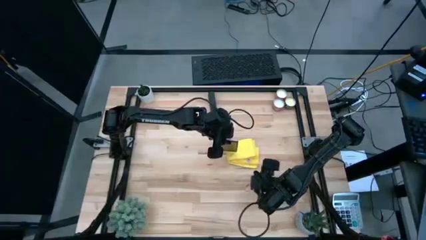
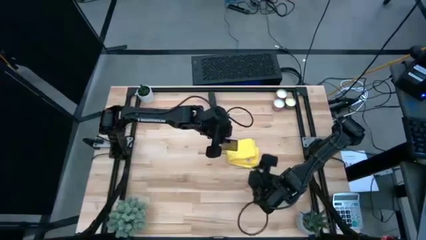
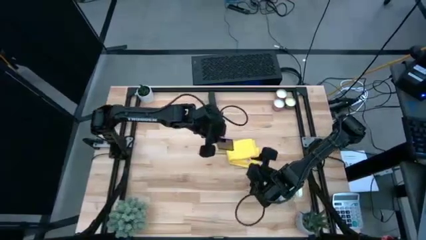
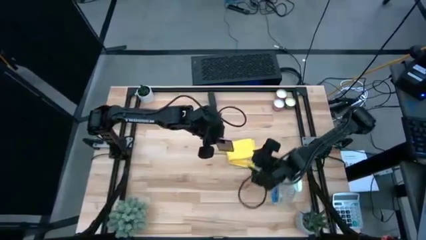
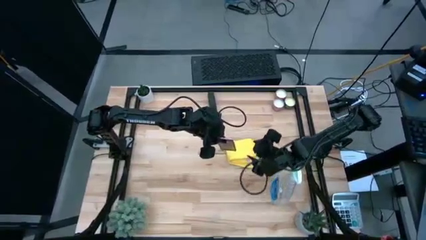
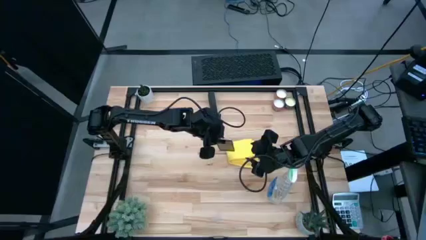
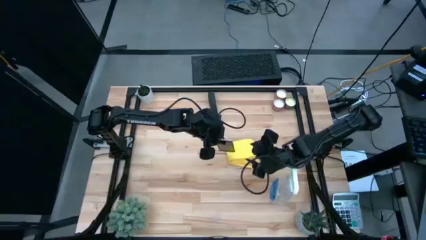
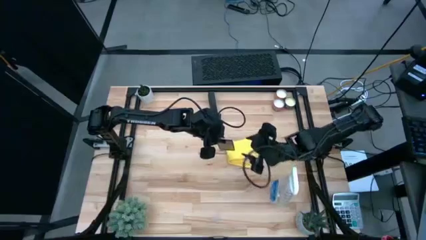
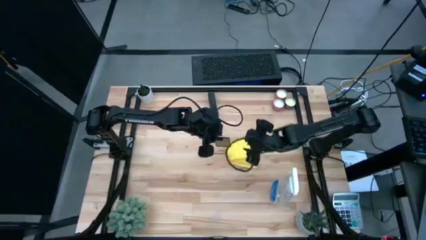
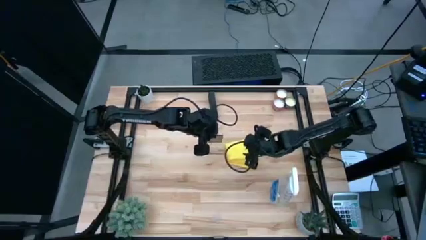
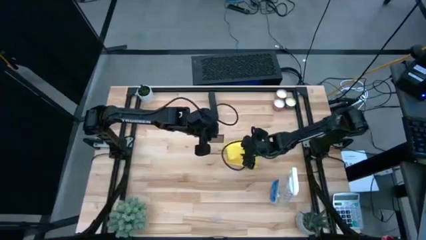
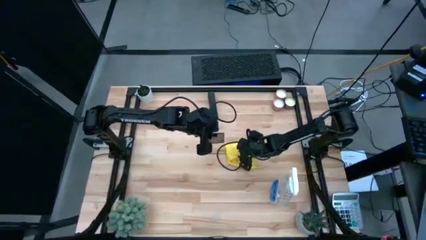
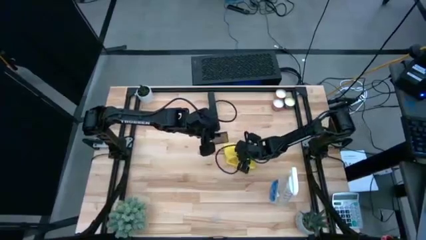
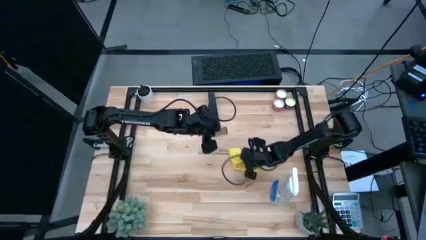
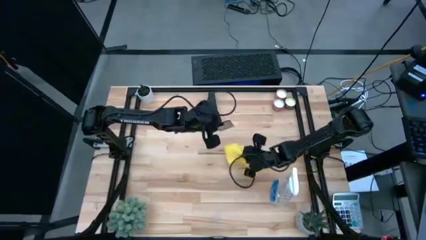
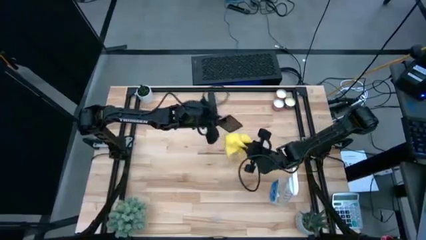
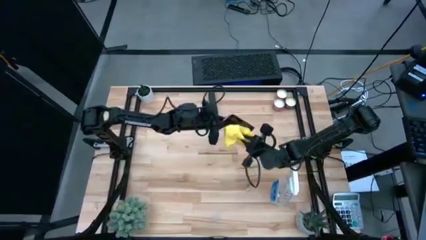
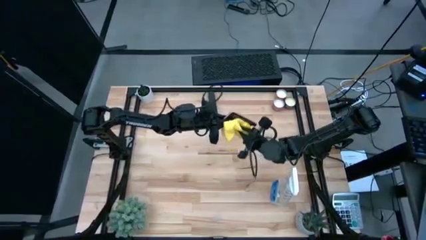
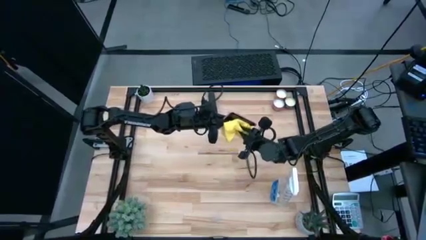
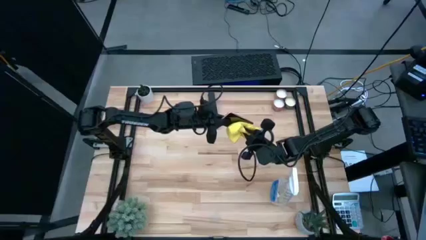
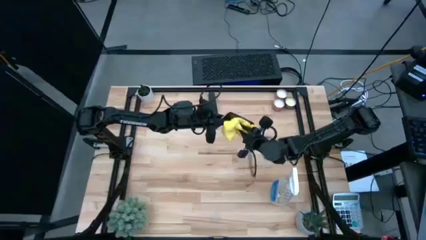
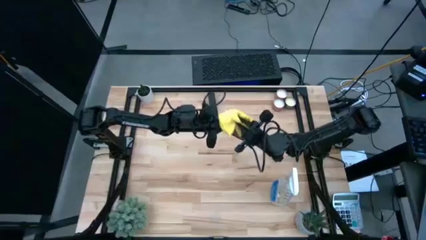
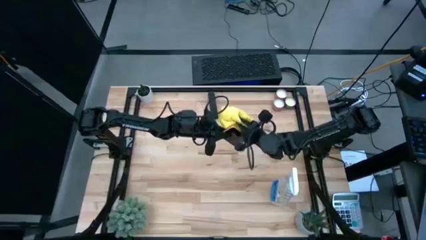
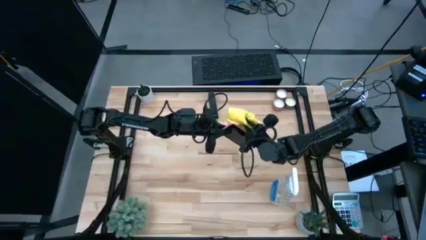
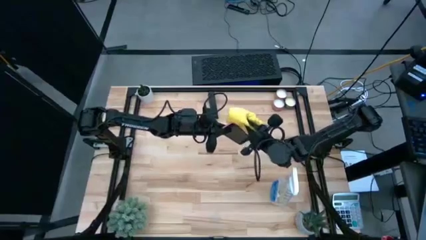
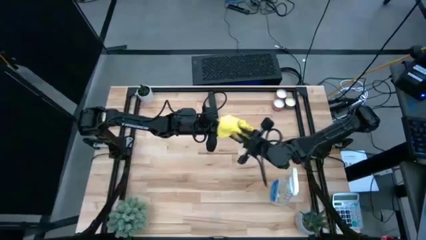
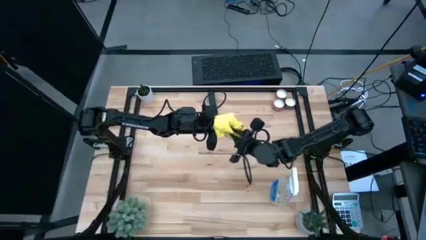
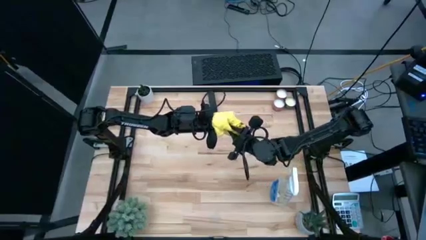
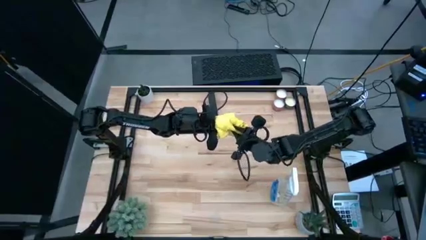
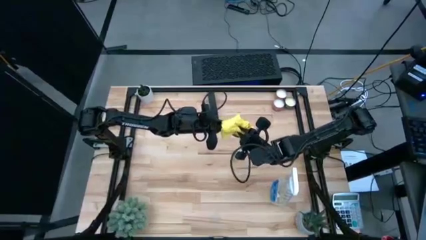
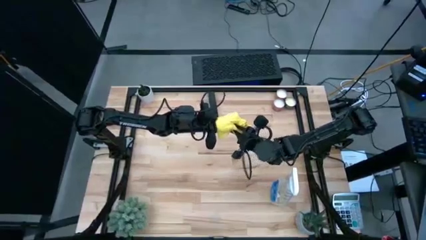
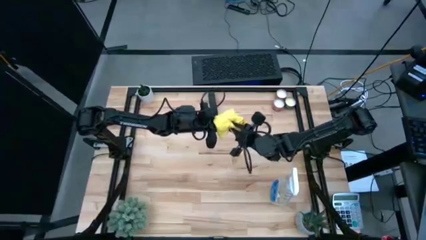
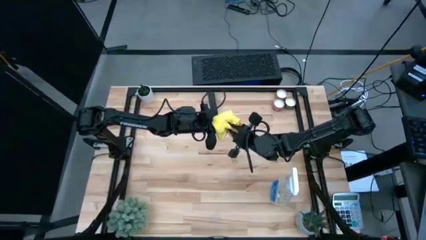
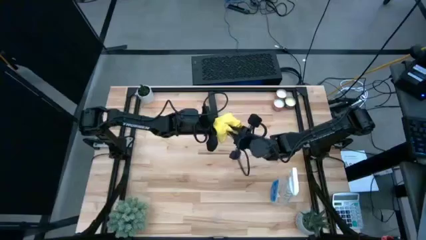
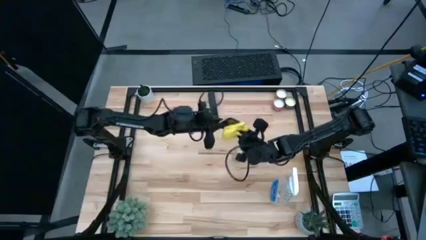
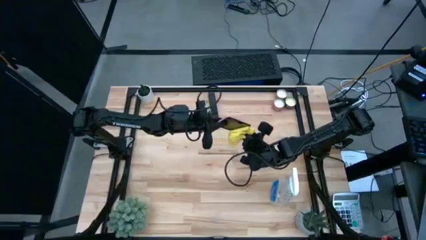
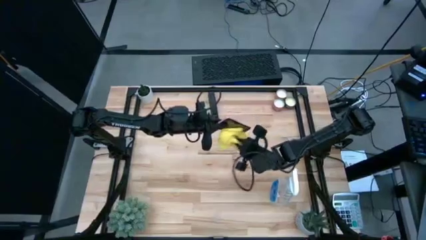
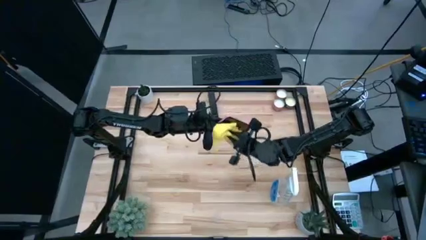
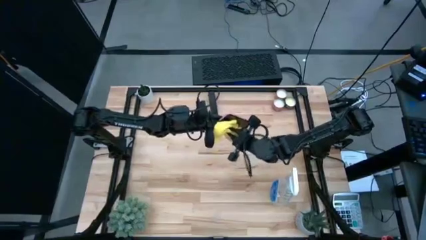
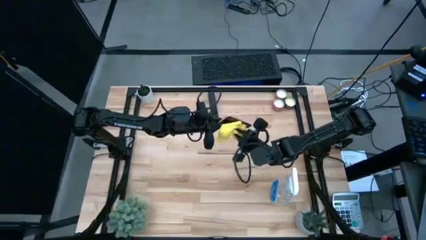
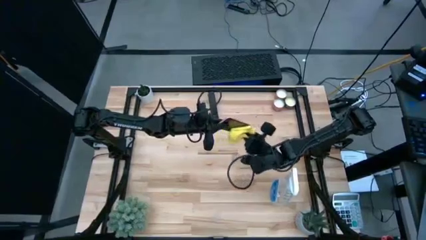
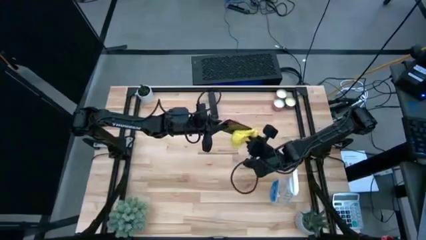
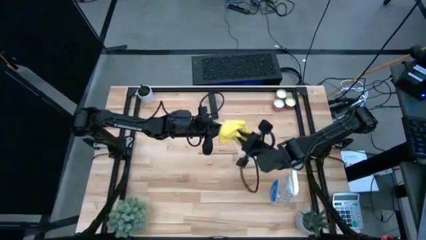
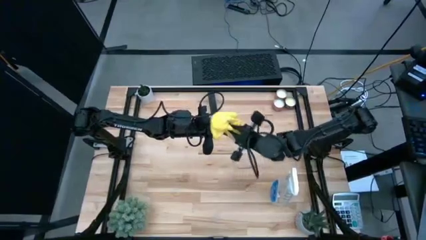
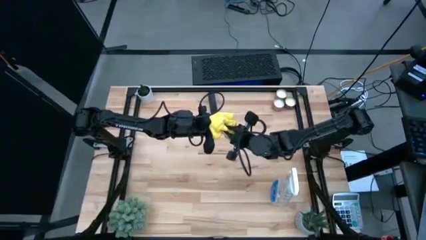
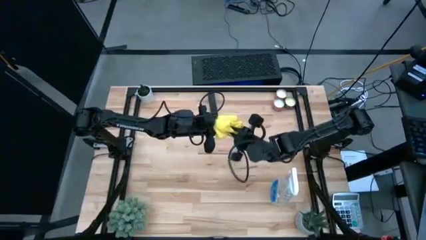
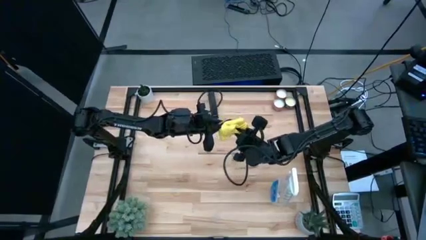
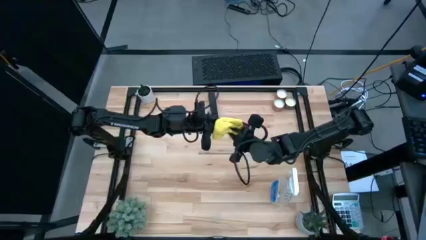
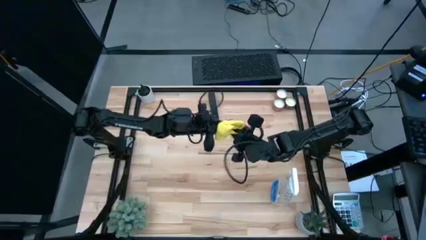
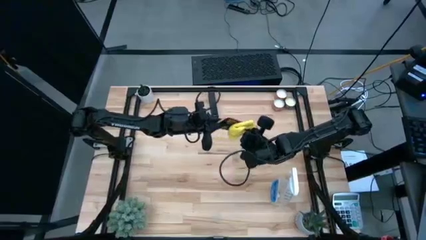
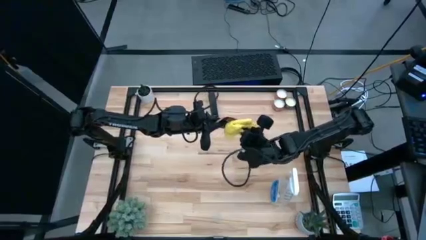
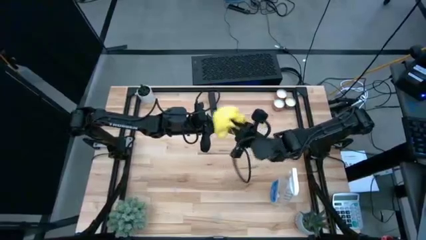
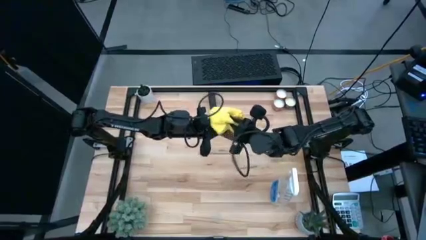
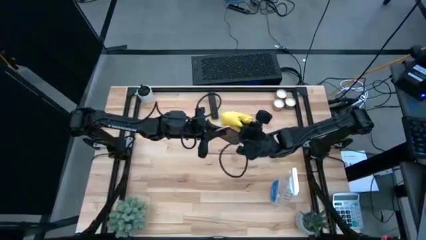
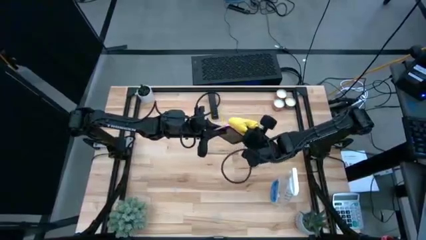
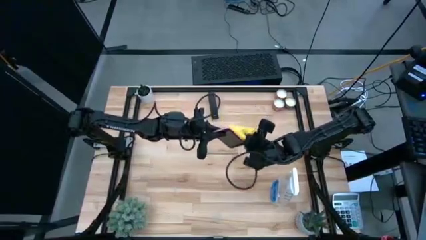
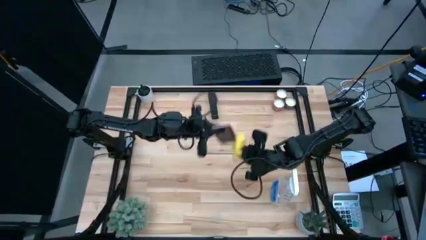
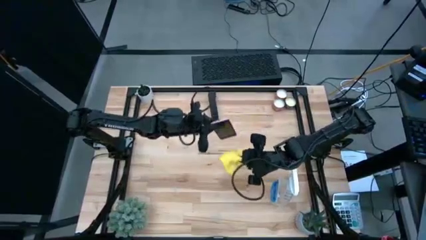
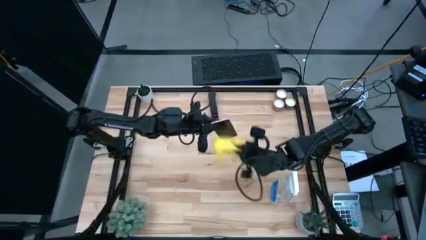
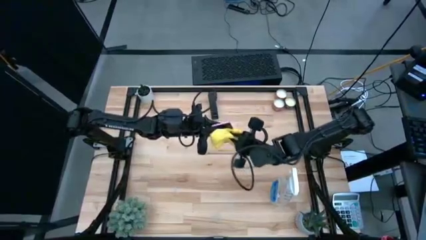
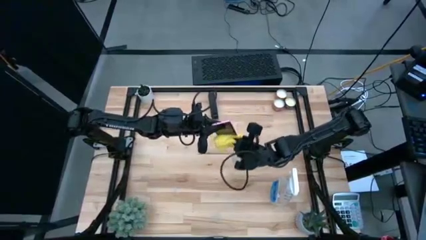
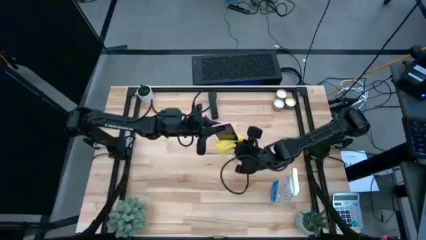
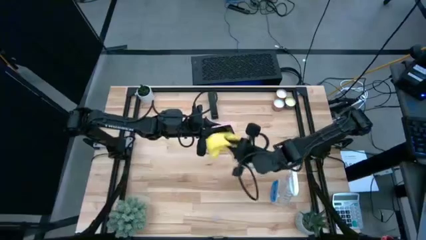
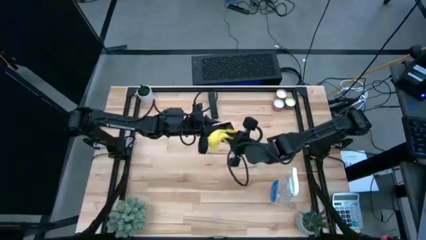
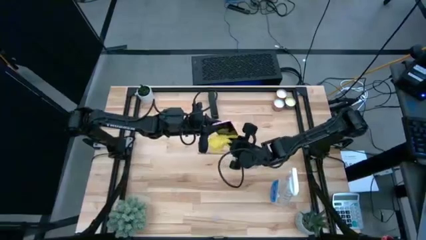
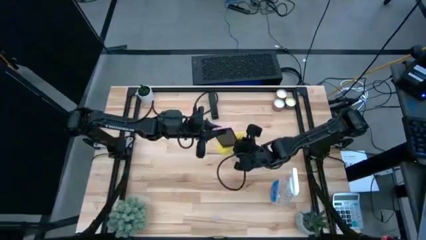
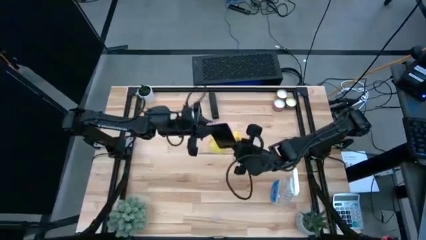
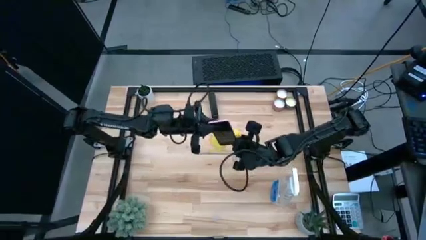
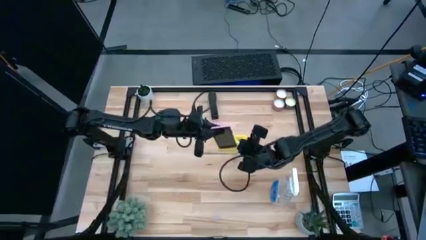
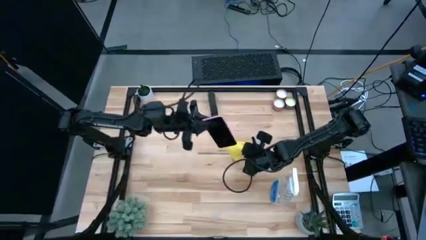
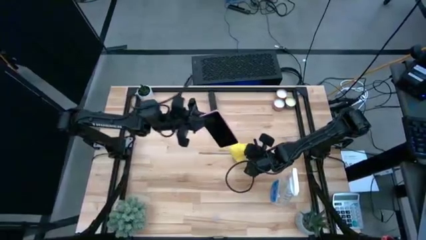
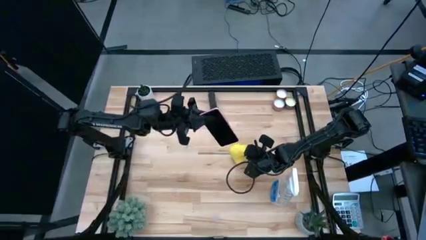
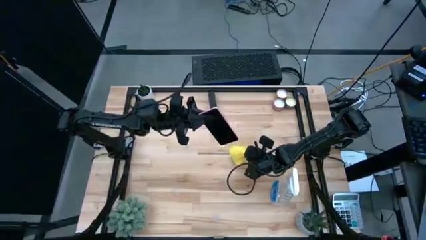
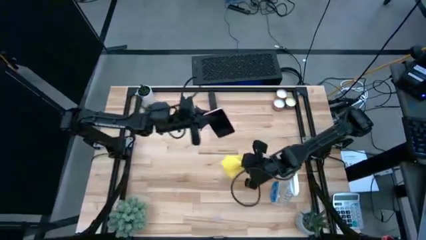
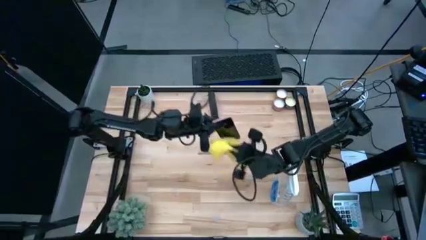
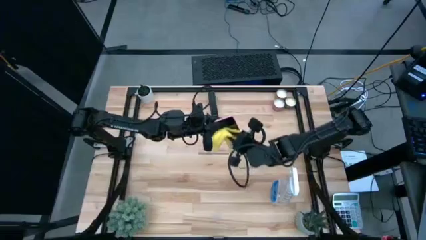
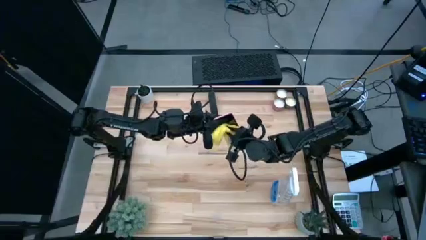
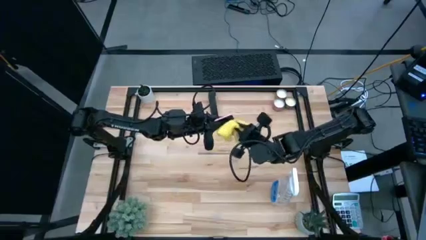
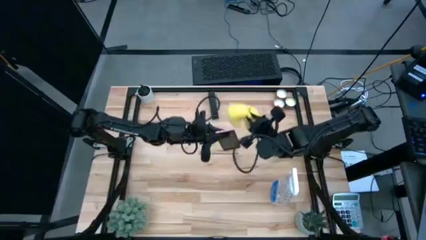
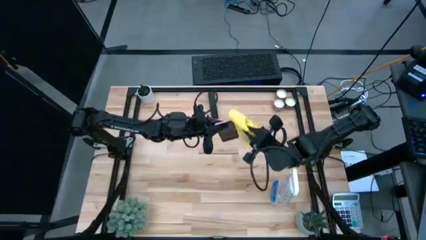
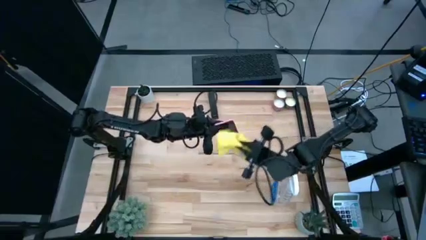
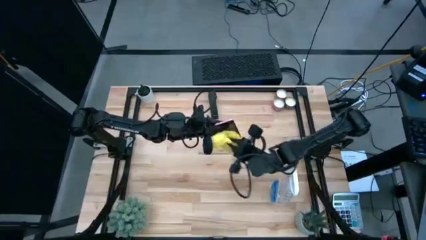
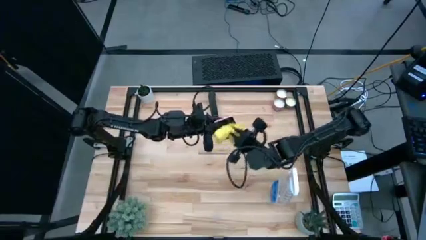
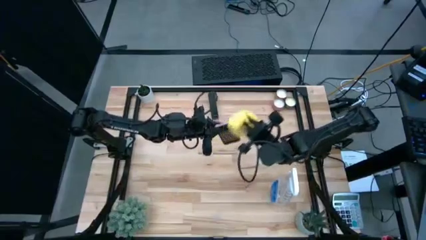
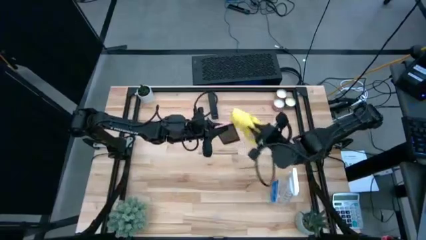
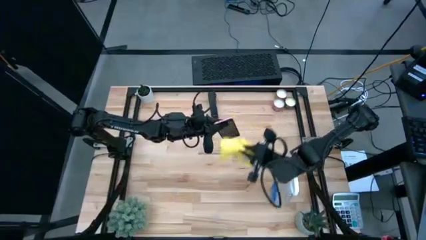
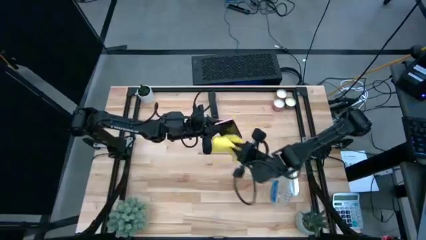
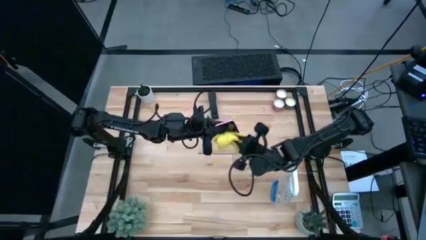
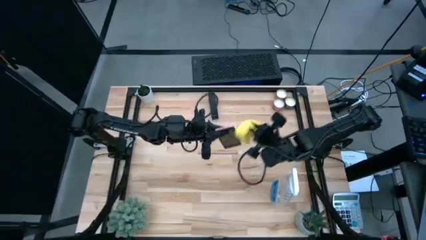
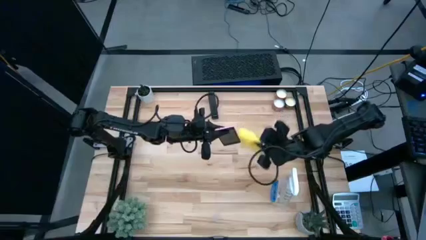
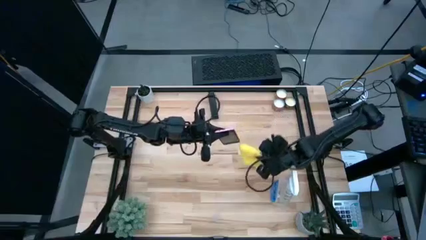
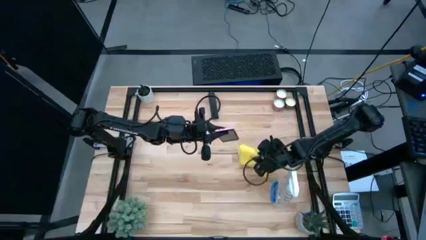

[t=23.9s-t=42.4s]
Task: Apply microfiber cloth
Wipe the cellphone with a yellow microfiber cloth
